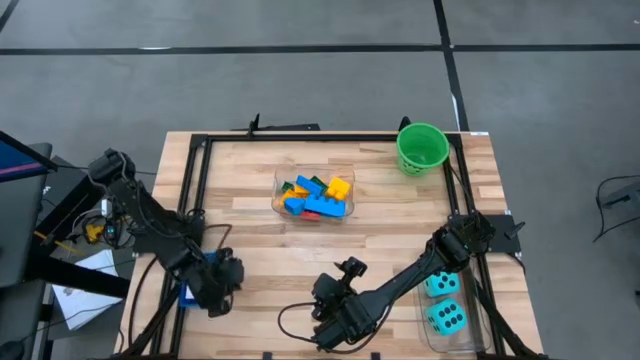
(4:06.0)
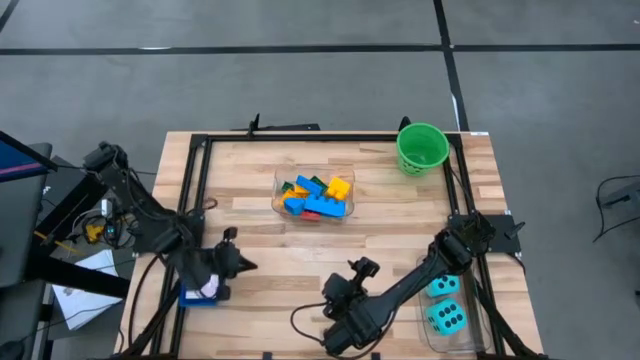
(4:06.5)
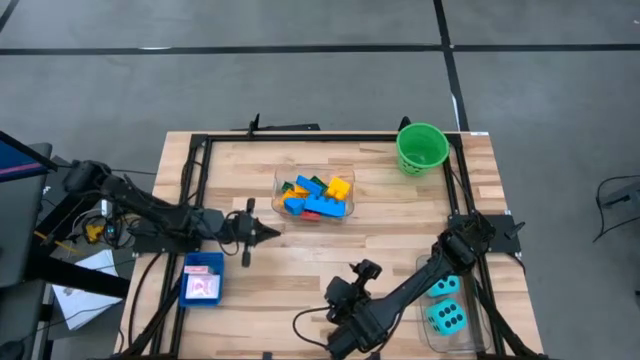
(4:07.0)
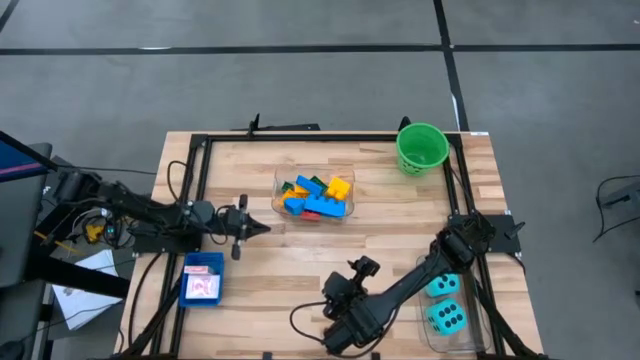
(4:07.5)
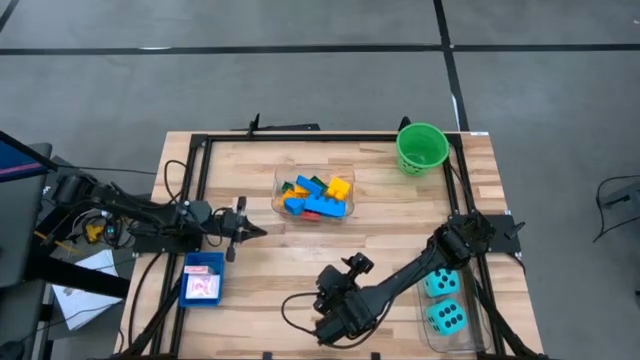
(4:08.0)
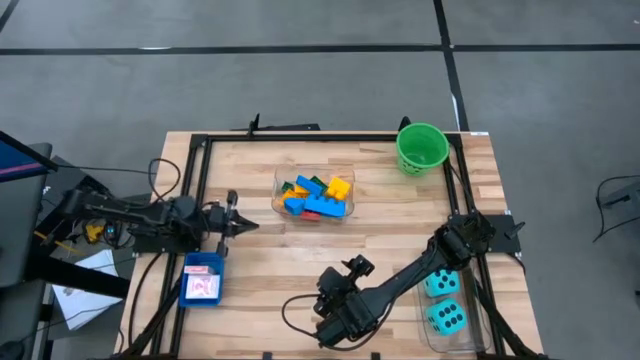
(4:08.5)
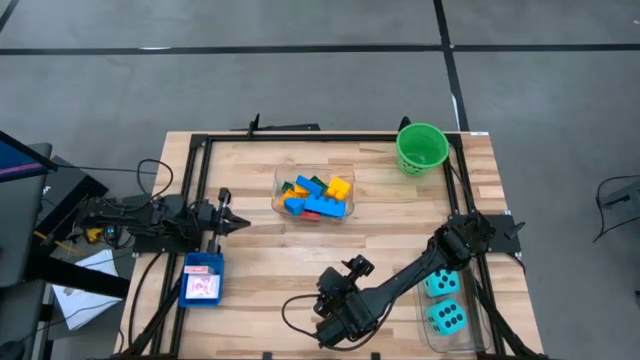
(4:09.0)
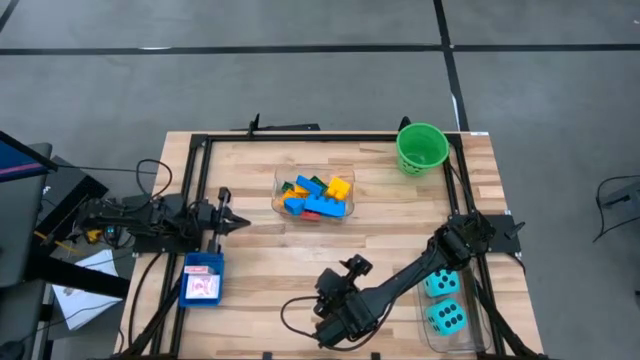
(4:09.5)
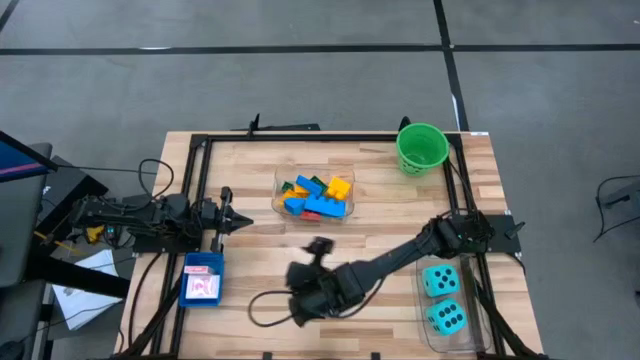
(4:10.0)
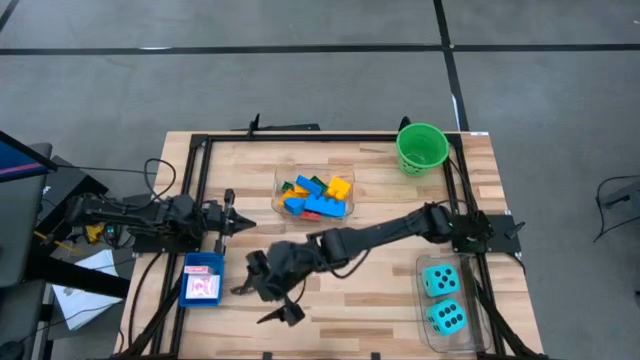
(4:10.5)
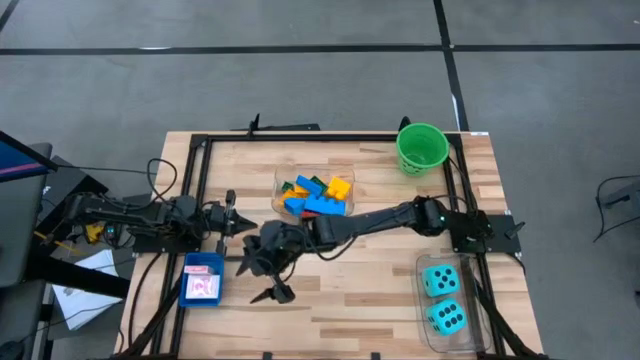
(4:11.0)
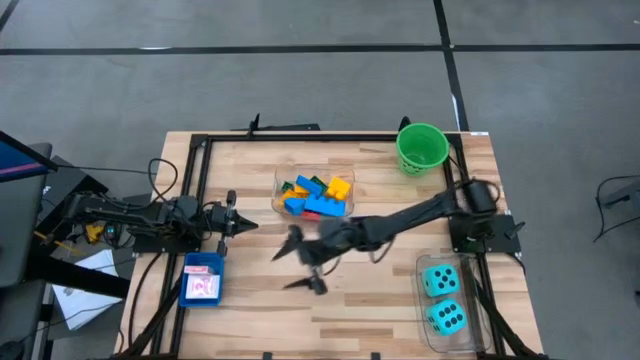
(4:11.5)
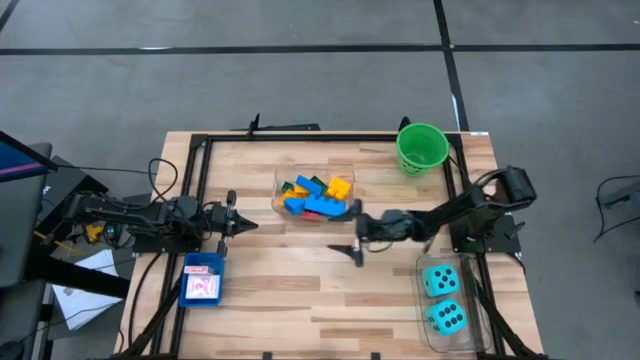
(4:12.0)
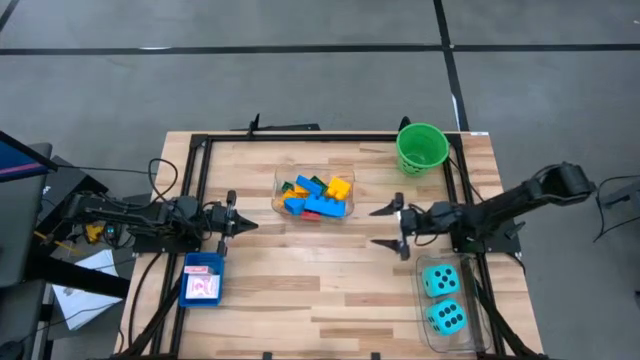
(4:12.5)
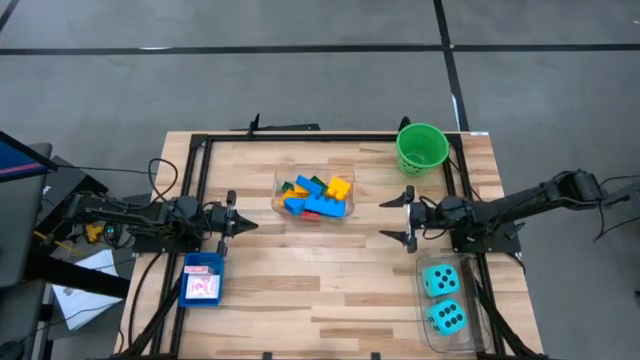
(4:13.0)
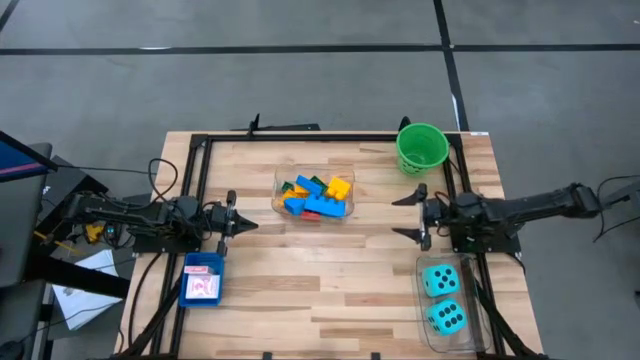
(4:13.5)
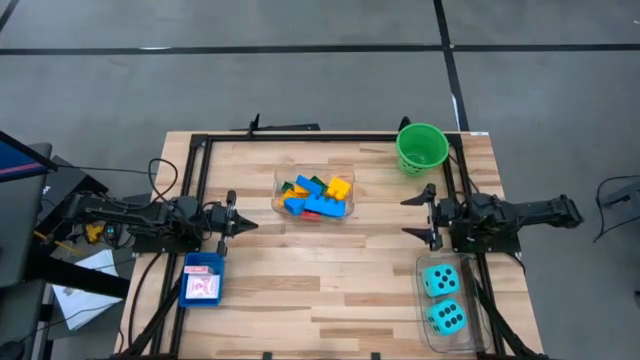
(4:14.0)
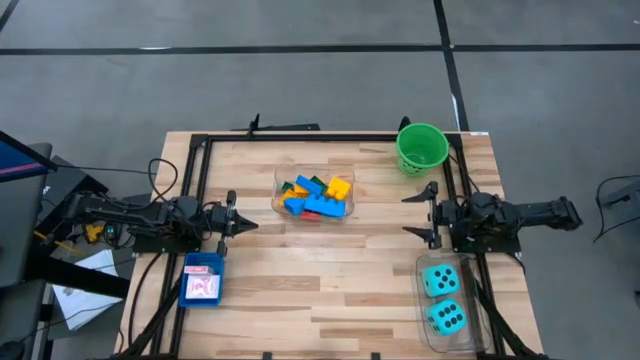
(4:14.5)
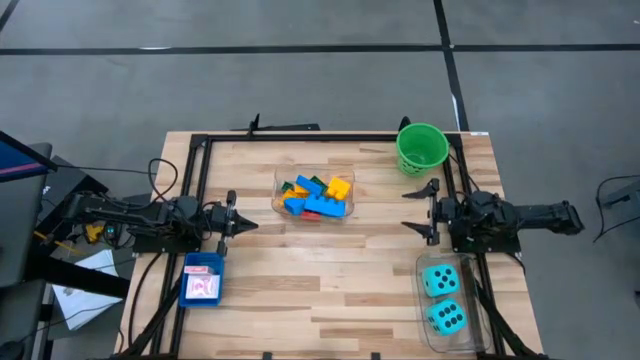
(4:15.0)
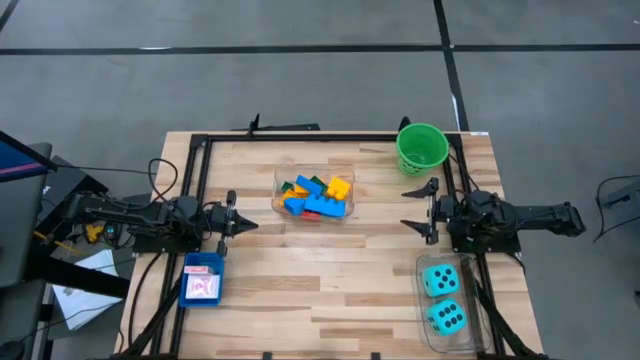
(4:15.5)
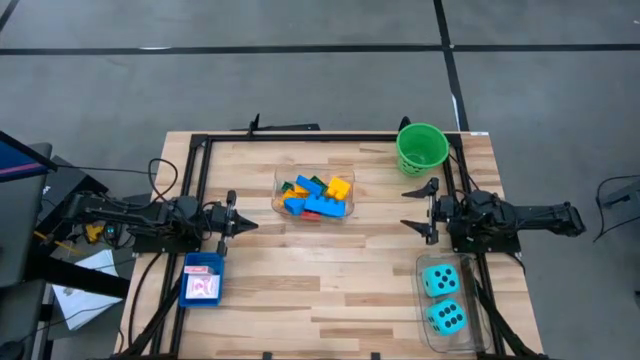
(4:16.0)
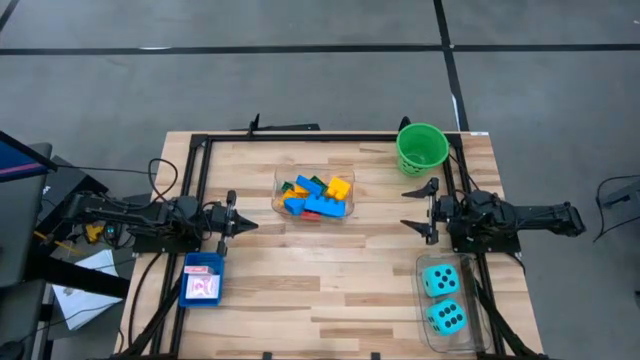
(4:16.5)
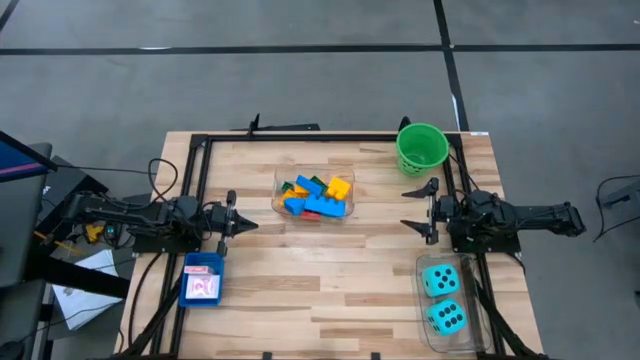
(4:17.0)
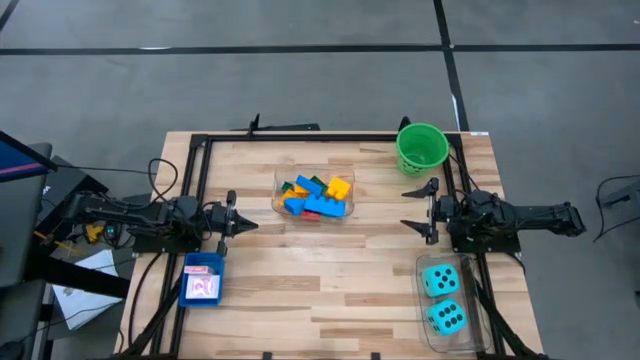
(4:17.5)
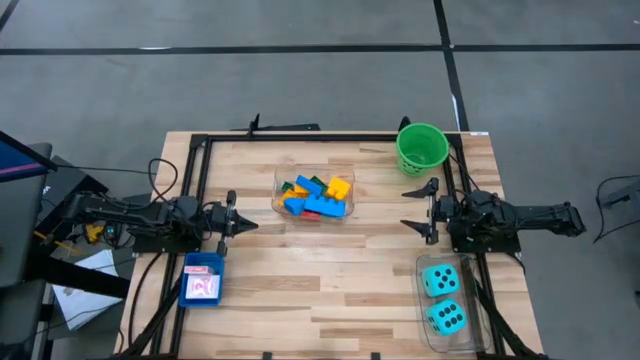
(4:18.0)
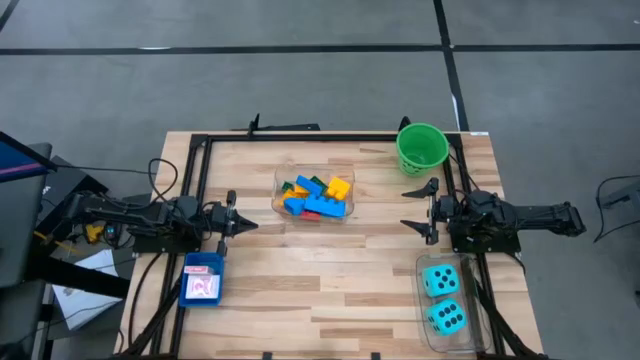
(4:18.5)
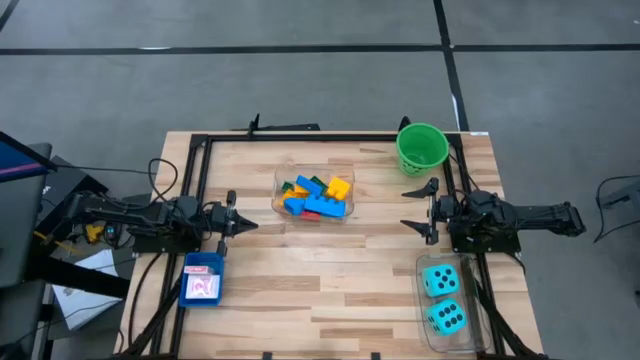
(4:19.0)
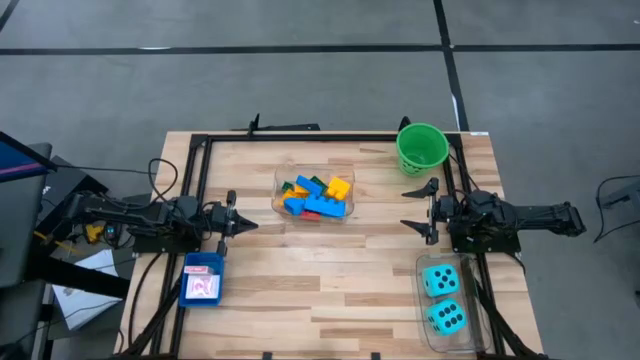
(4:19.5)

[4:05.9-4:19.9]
Task: Pick & Place Toys
Return to Home Position

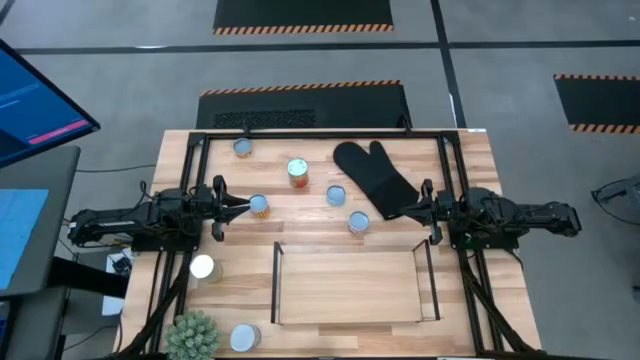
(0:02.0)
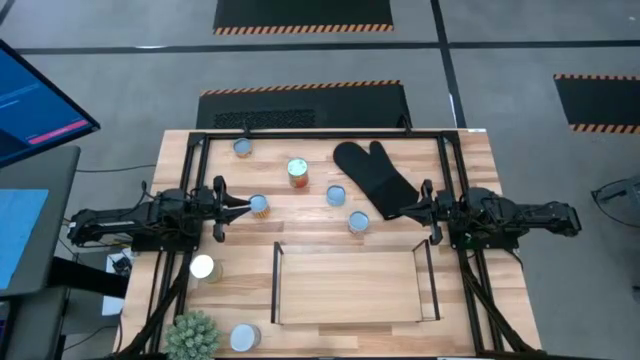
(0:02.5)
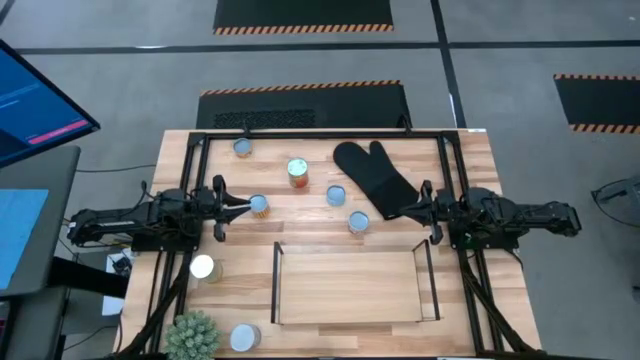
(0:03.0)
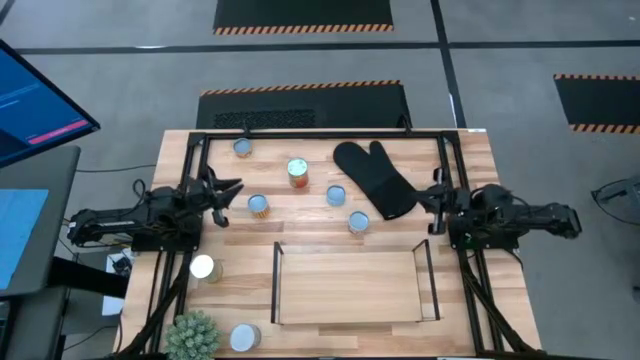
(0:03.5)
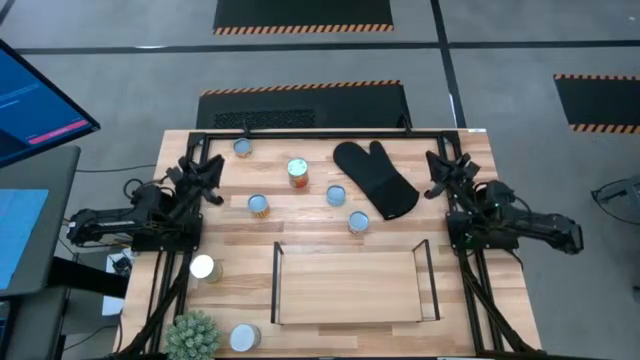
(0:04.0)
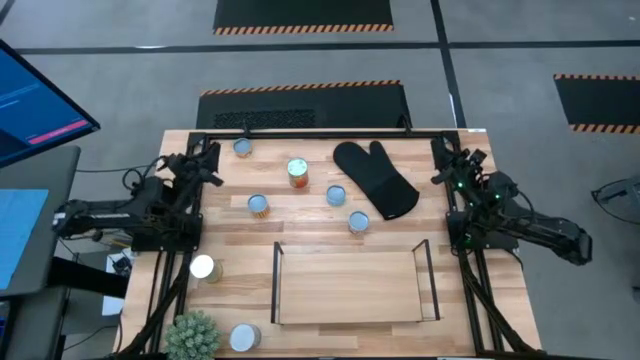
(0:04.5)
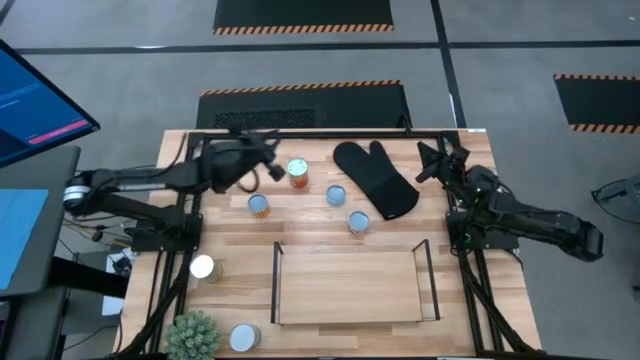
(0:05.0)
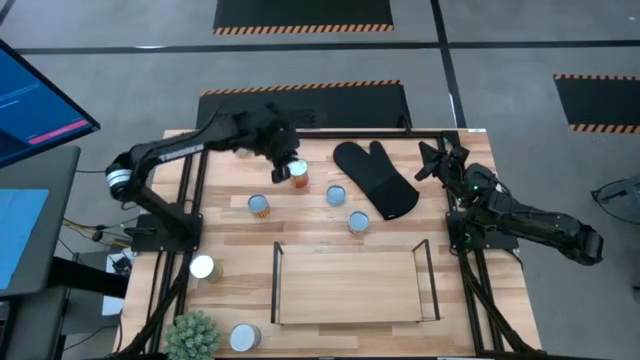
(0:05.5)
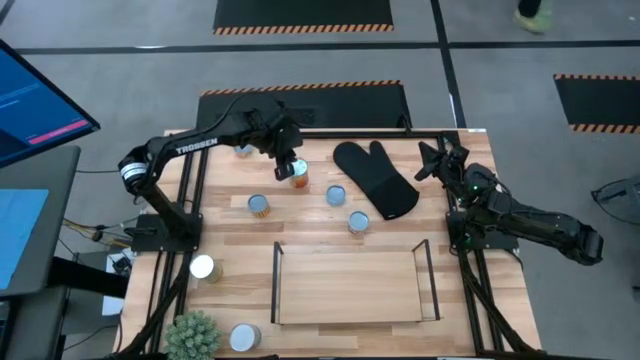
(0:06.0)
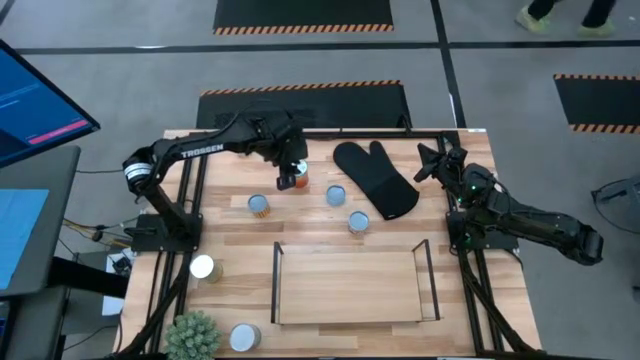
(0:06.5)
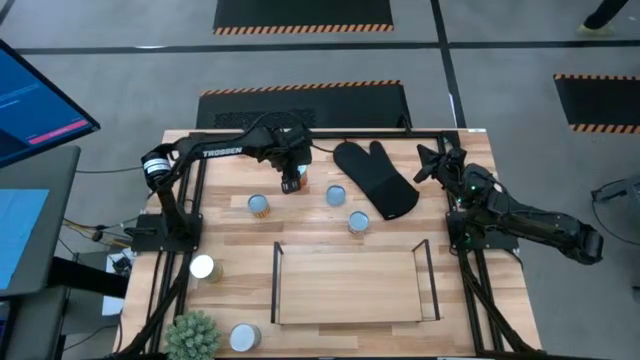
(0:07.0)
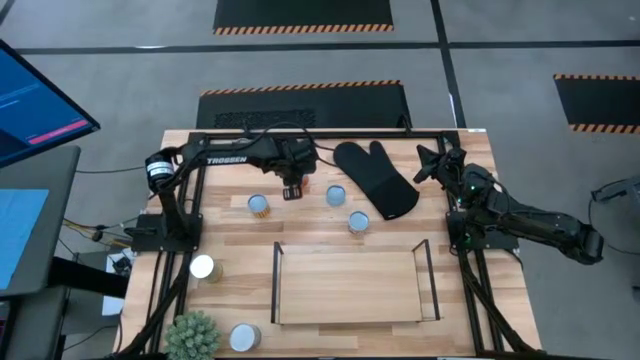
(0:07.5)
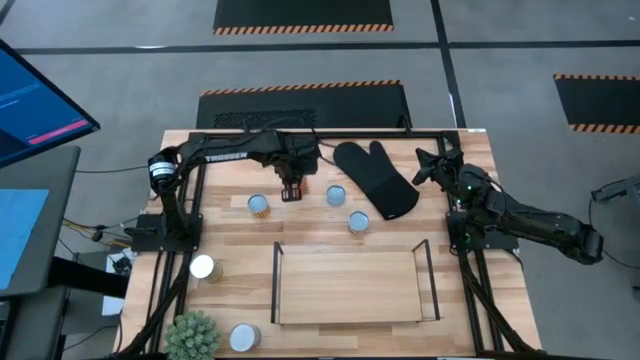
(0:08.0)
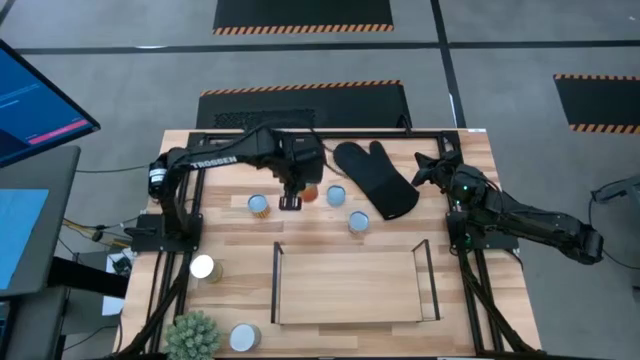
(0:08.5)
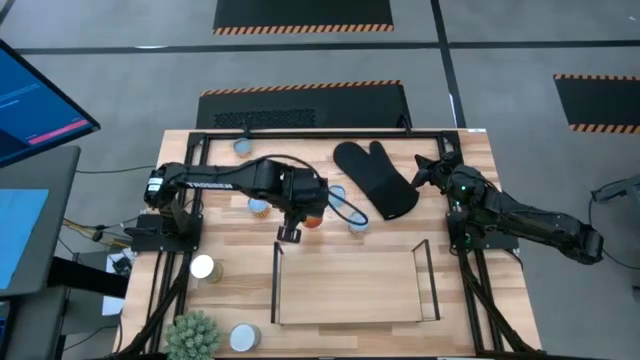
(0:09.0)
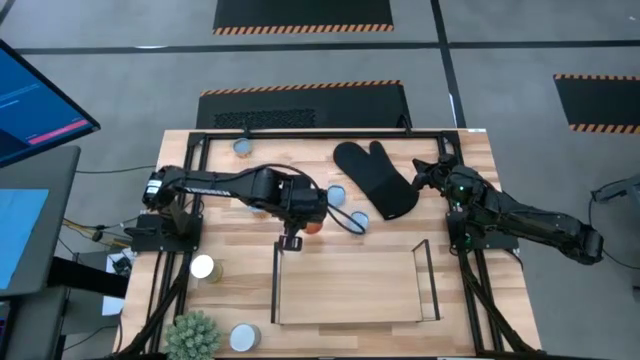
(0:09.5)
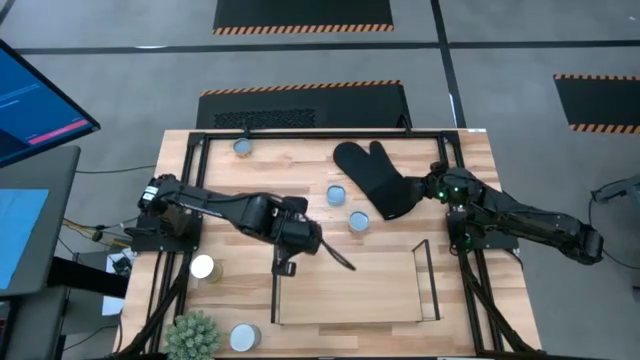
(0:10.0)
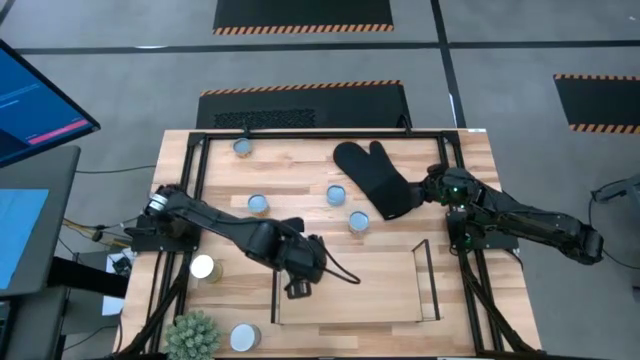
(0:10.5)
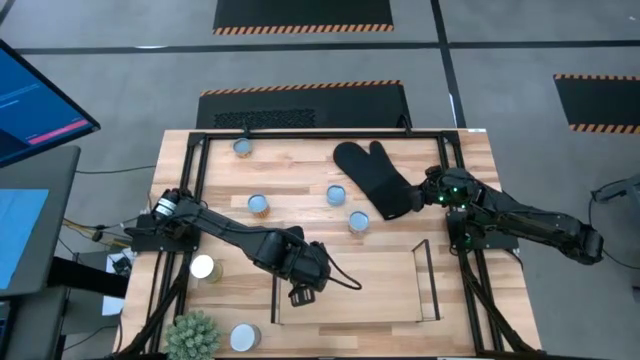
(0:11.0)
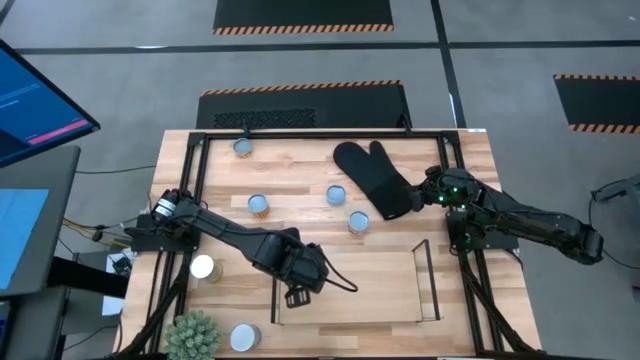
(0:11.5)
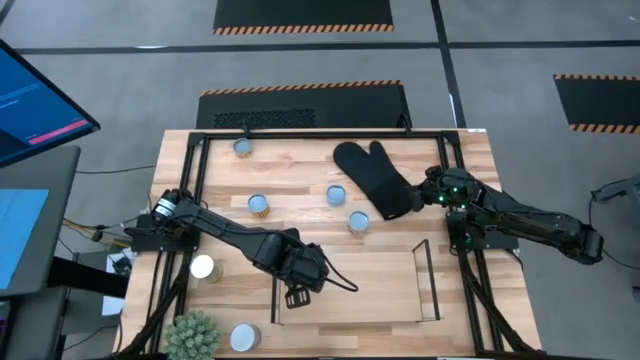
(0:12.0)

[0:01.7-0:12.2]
Task: Pick and place cans onto a shelf
Put the canned pineapple on the shelf
